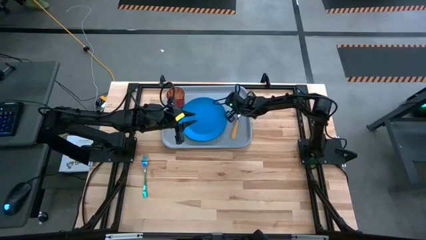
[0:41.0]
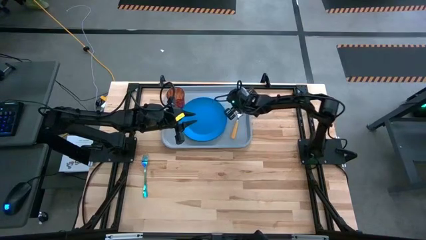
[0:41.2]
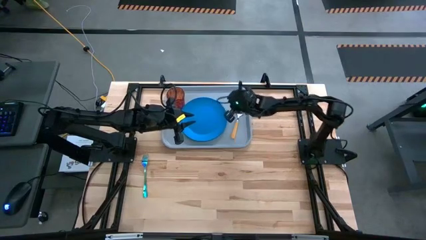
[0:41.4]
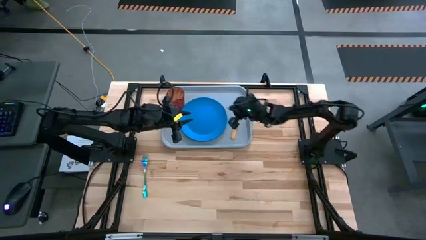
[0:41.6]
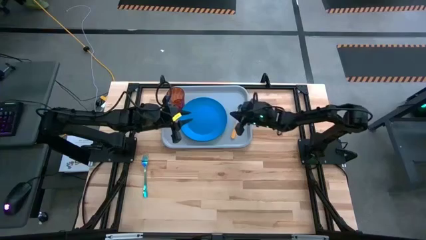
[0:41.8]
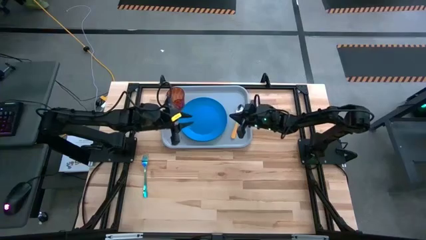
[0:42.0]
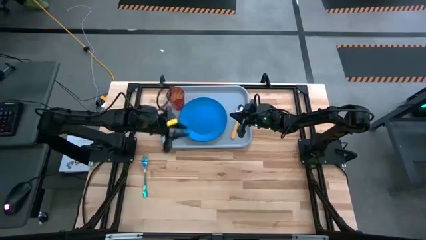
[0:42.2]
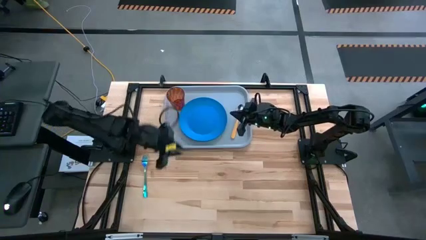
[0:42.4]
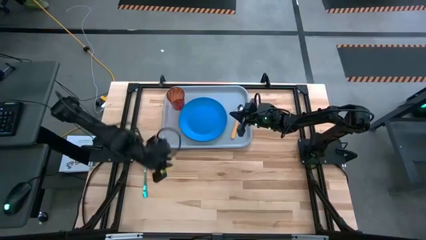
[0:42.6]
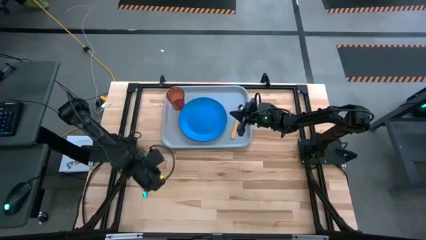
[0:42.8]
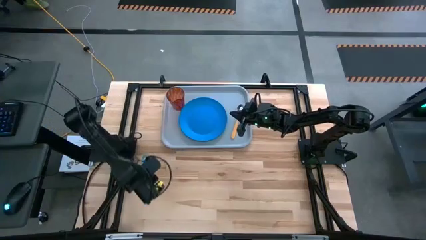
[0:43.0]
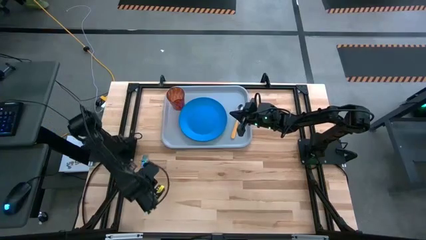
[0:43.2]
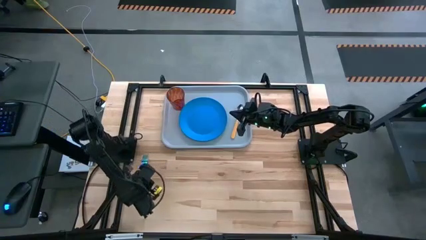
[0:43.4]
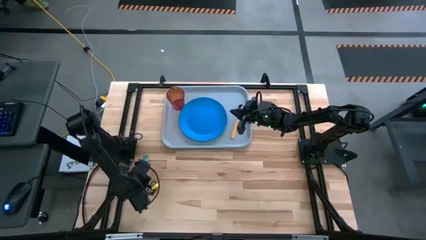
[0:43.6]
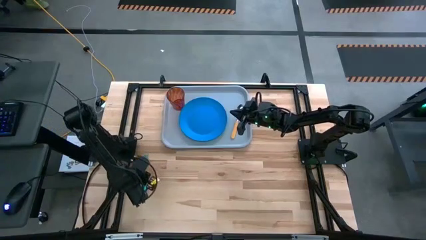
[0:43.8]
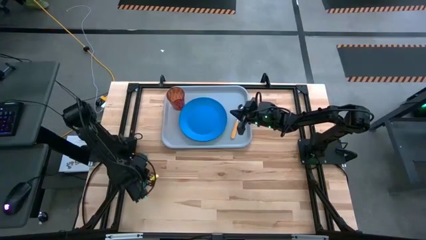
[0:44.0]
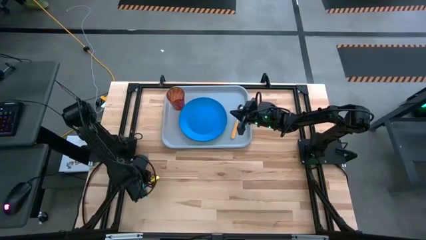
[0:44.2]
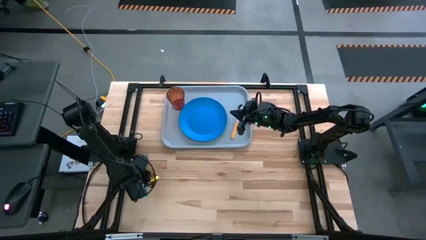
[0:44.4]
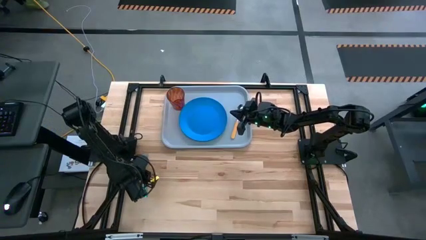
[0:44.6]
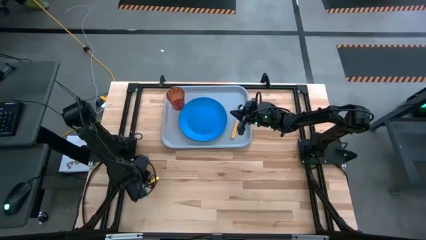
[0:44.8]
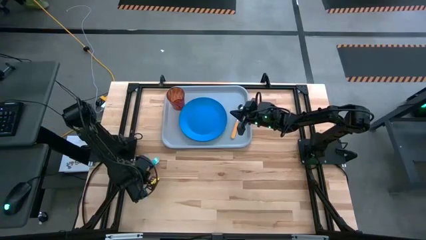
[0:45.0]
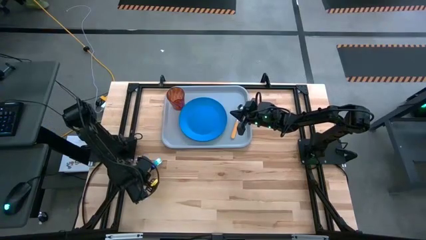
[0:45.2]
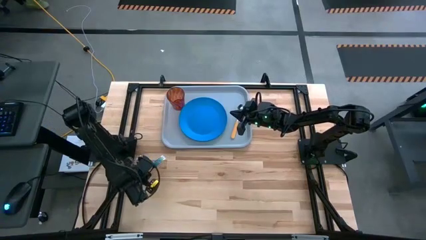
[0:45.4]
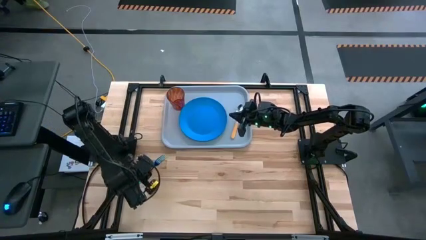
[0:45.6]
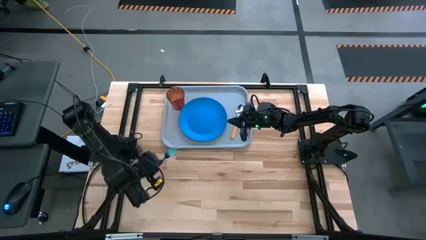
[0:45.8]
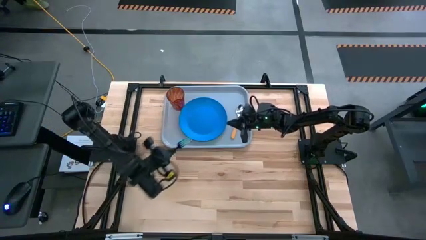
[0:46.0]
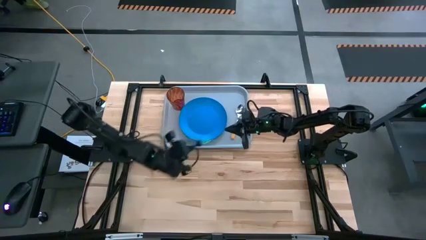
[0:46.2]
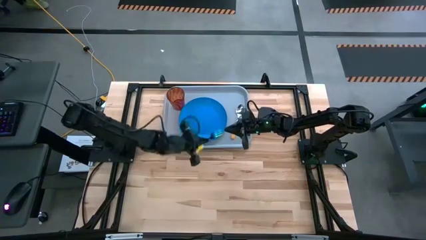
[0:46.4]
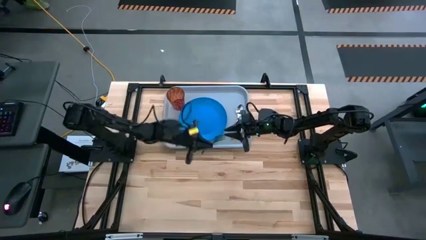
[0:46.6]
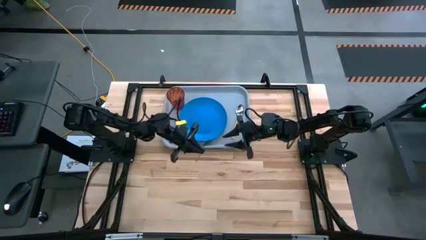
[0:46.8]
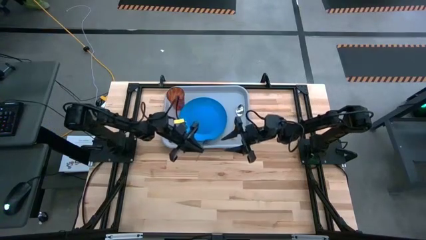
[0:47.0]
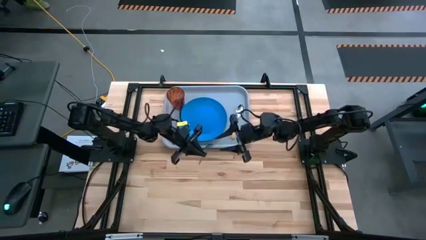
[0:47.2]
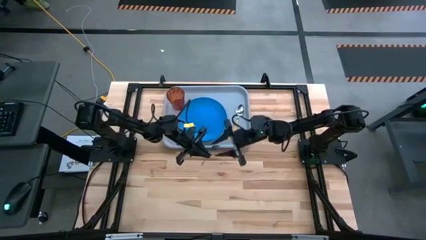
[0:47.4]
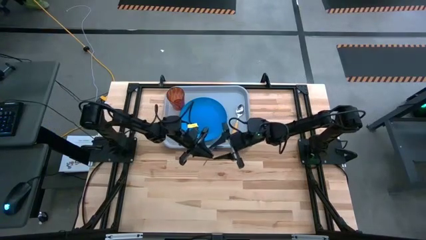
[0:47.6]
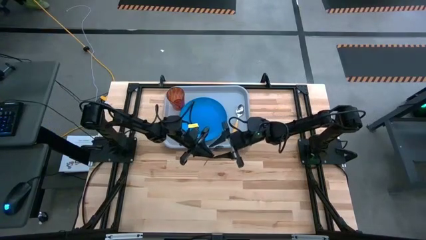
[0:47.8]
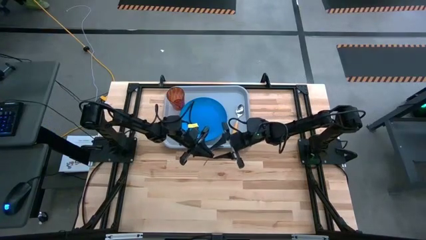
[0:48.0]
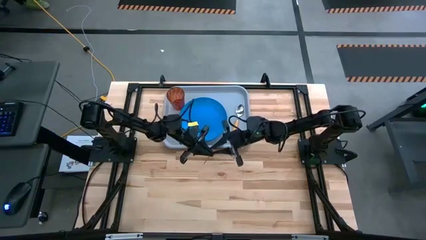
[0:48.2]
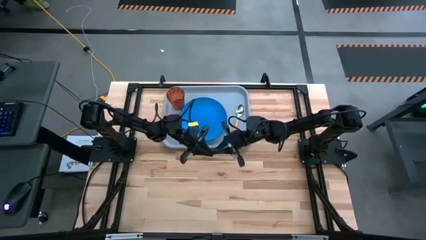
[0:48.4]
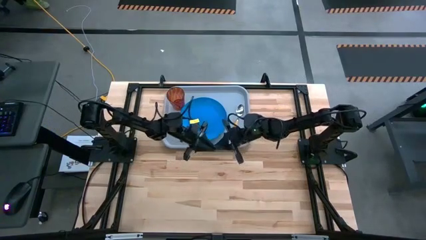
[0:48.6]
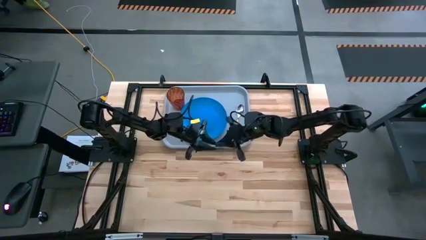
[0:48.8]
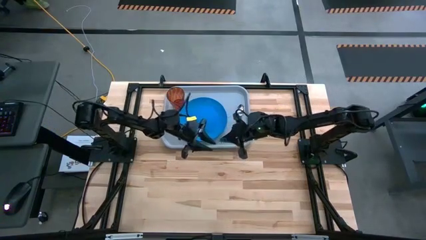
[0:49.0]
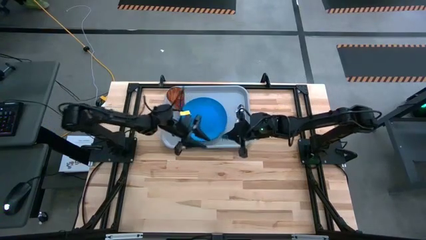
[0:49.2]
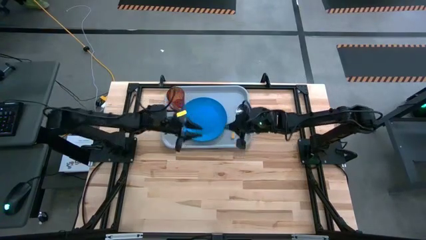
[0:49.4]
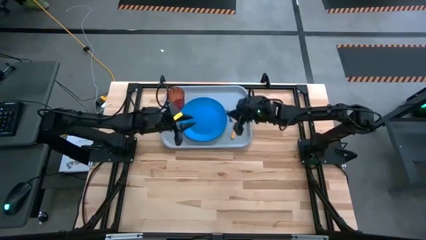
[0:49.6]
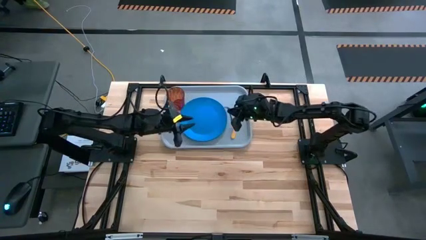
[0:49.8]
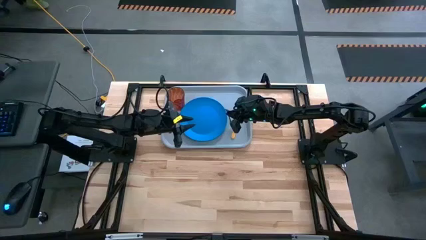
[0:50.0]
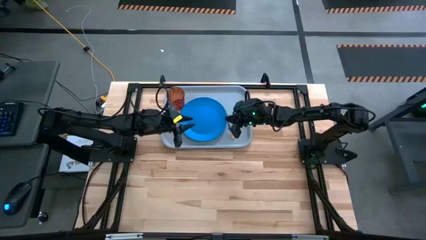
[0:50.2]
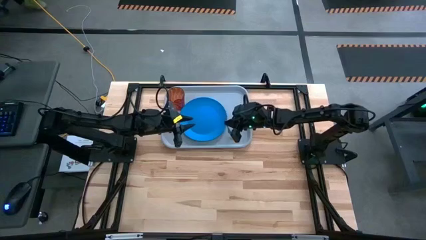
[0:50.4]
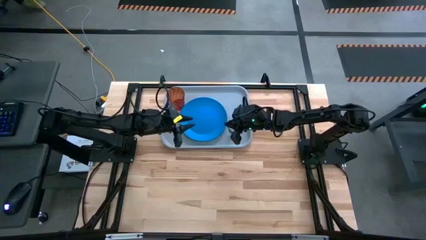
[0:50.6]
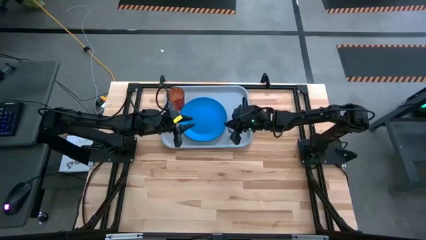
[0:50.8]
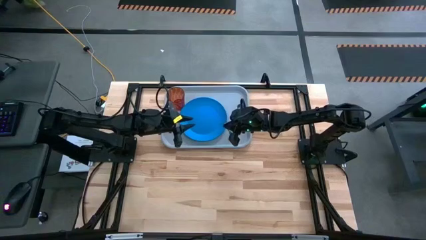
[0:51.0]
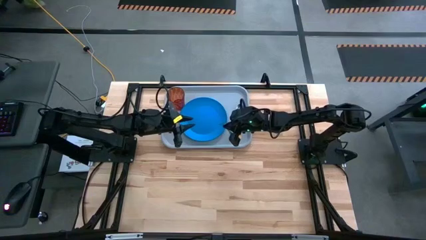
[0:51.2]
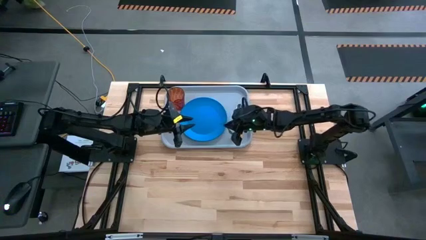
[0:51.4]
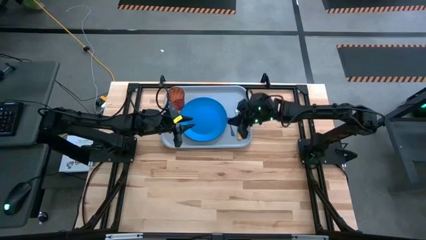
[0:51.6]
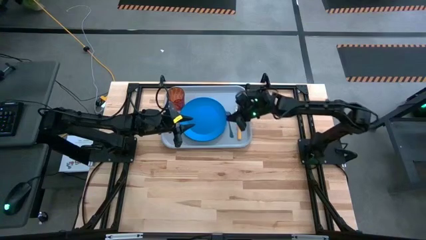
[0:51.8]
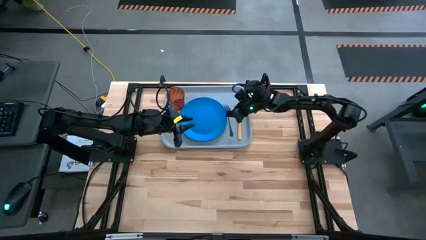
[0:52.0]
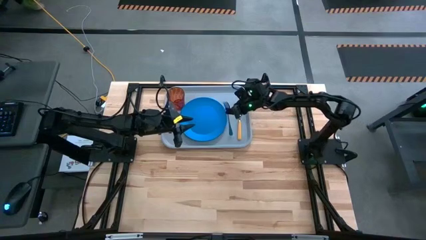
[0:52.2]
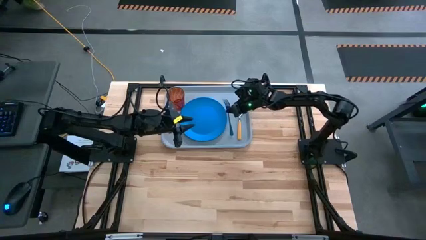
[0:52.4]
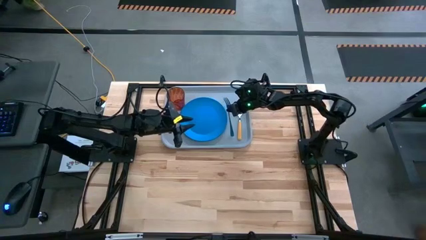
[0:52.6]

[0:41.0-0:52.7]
Task: Pick and place plate/cup/fork/spoon on tray
Put the blue fork on the gray serving tray to the right of the blue plate

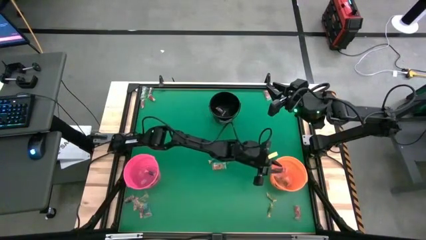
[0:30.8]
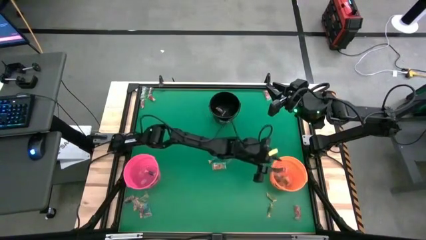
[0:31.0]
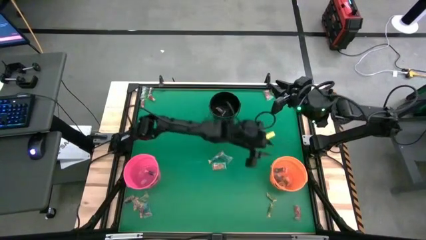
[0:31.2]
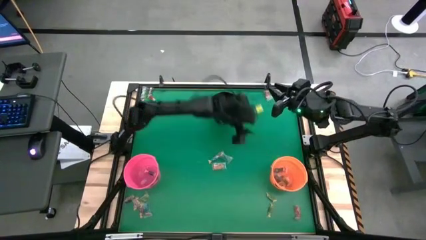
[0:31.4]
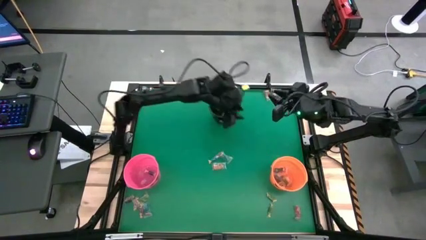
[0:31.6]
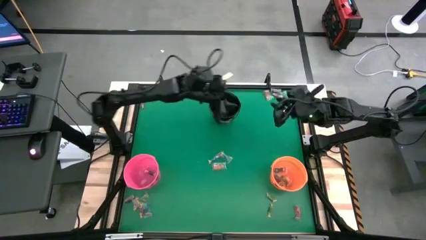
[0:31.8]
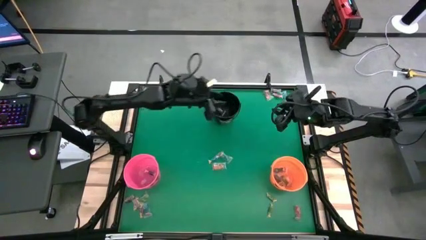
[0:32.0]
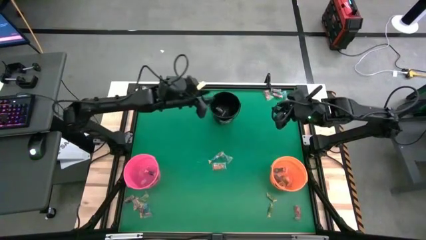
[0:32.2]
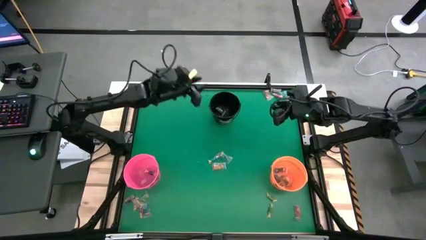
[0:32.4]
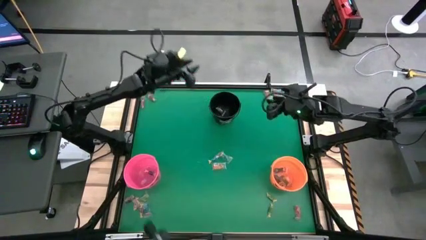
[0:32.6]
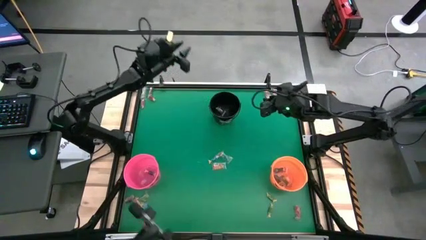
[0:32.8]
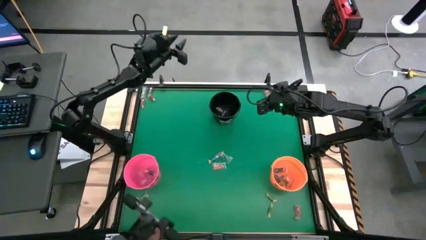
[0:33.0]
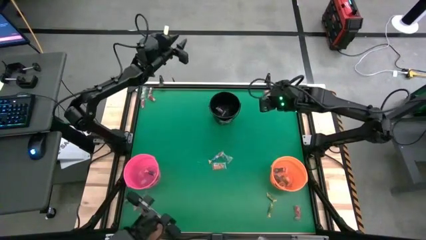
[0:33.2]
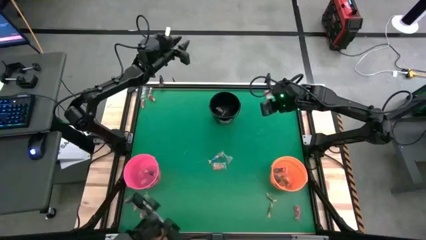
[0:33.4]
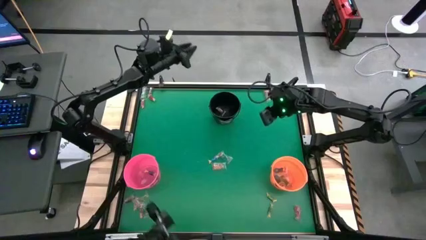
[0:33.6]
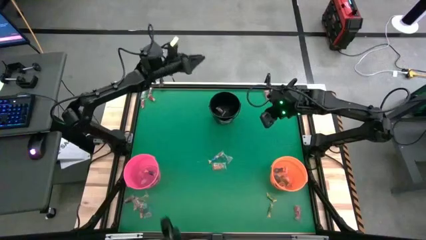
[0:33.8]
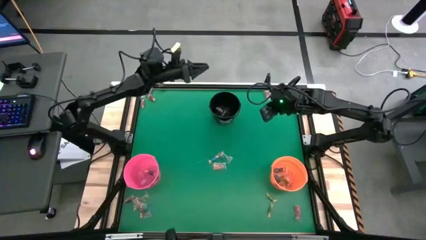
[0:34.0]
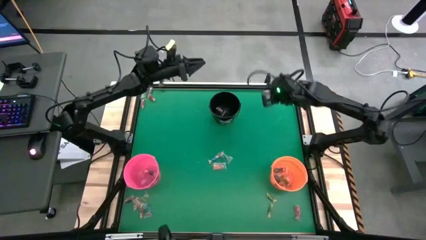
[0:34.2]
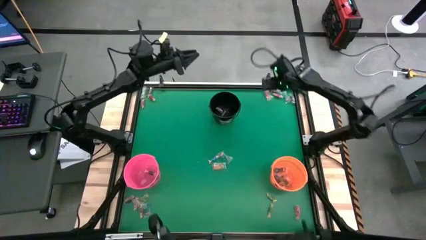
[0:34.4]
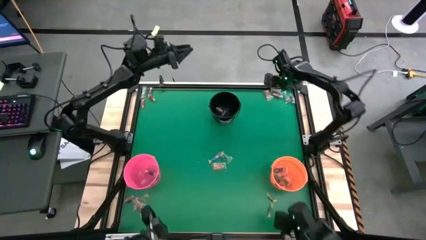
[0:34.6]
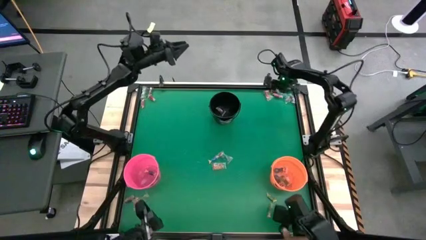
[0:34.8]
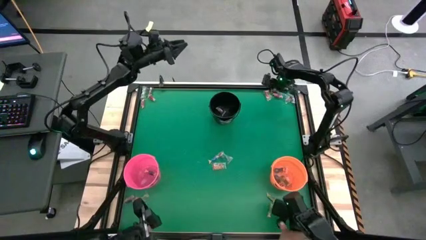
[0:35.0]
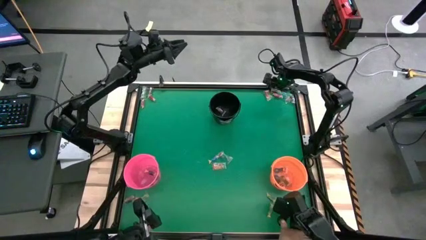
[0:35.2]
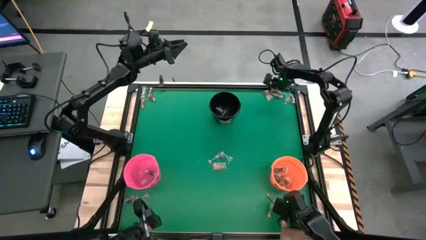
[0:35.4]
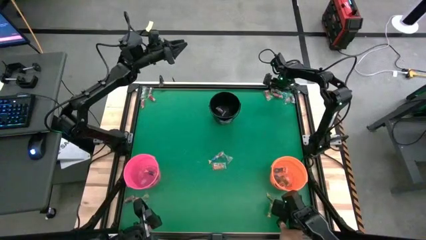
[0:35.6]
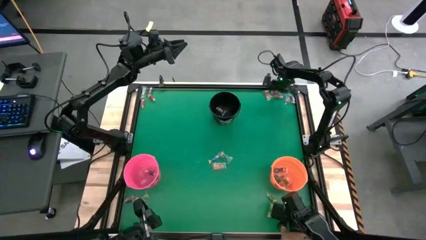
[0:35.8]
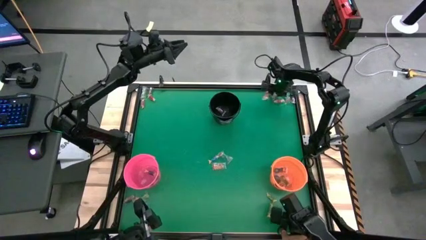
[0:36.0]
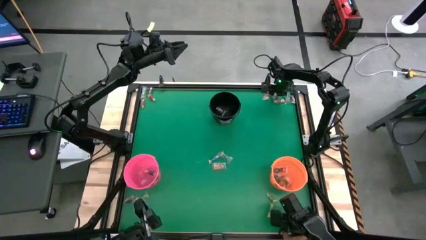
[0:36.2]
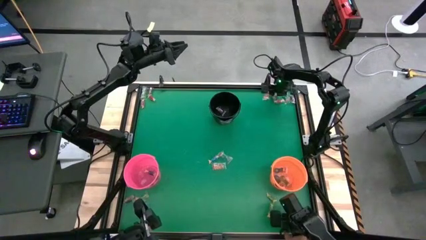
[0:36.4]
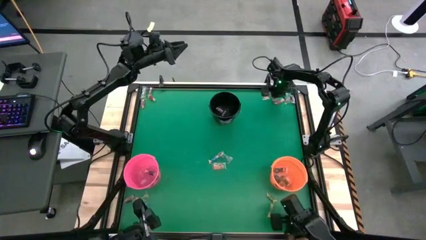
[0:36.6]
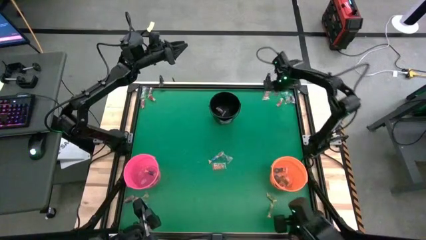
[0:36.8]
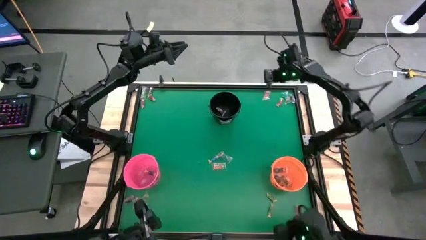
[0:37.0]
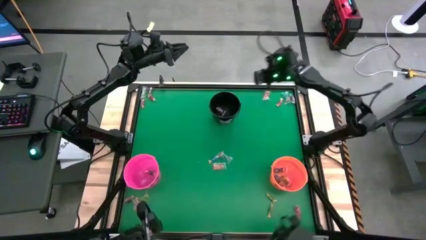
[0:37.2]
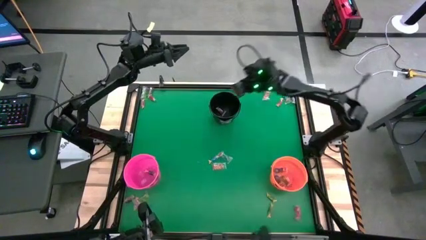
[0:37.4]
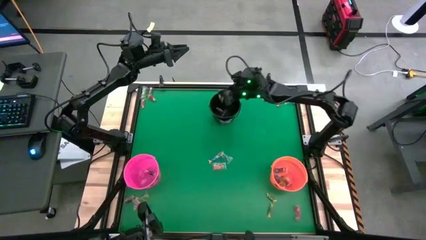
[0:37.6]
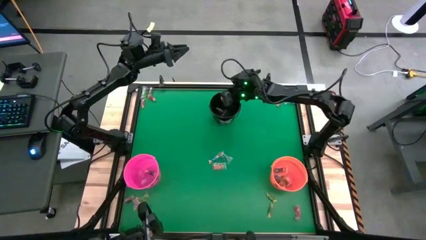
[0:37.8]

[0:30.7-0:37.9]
Task: Sort candy by brand, put in halloween buckets
Put the transparent candy into the black bucket
